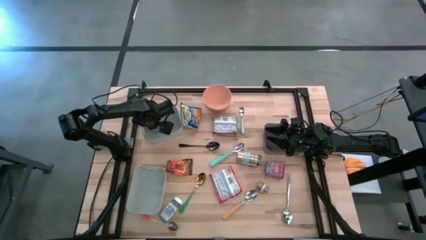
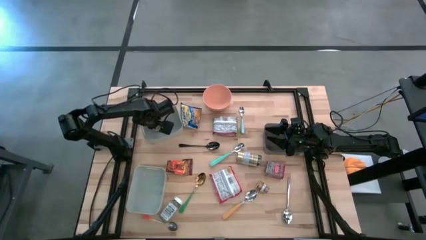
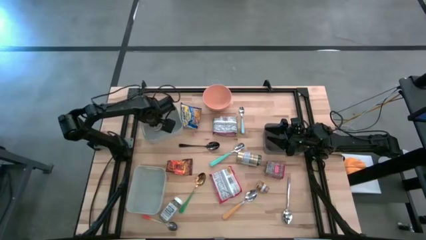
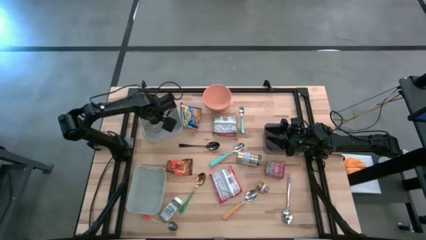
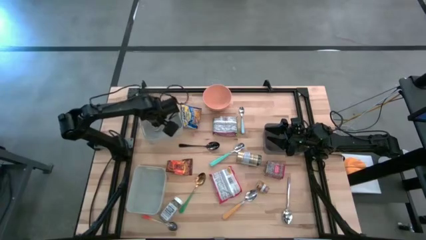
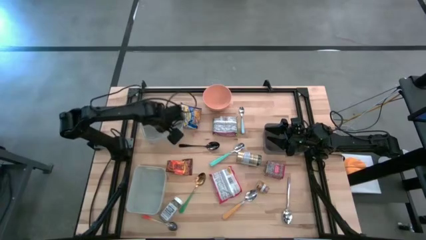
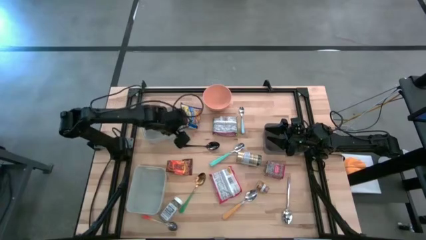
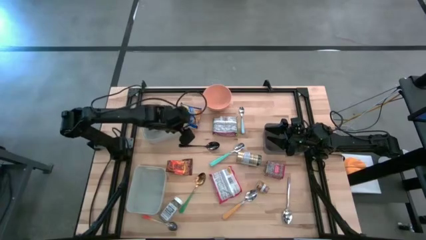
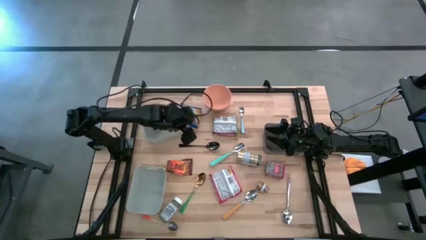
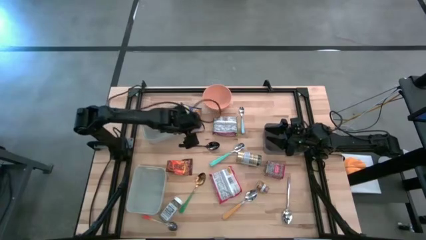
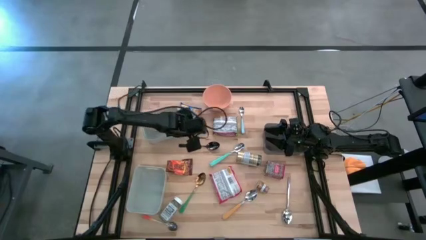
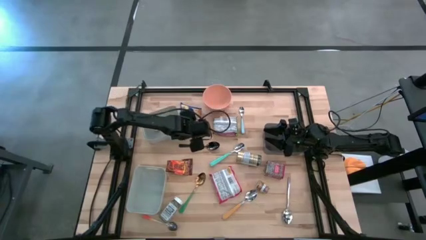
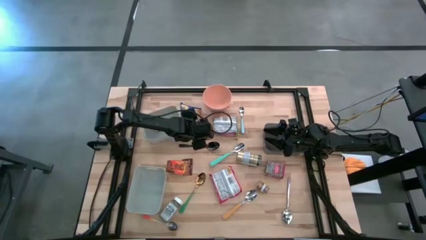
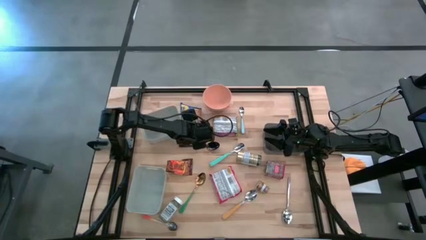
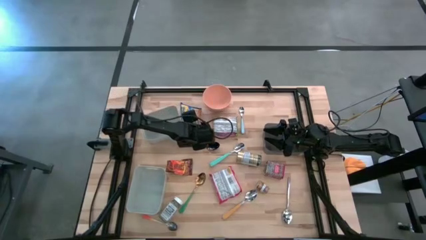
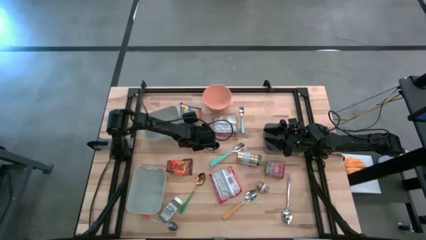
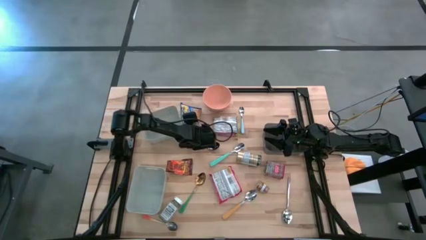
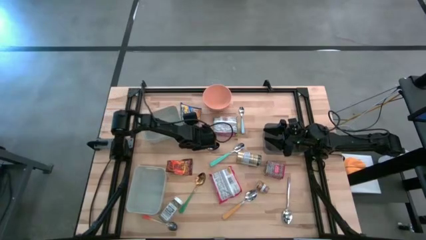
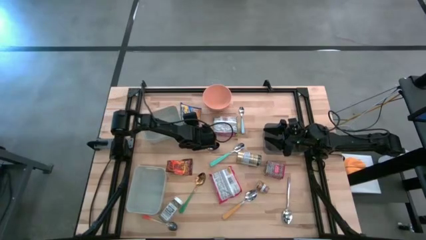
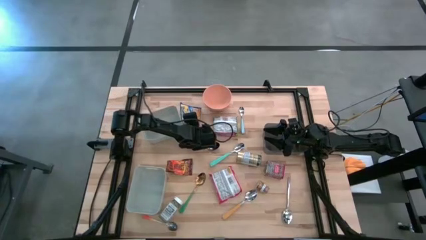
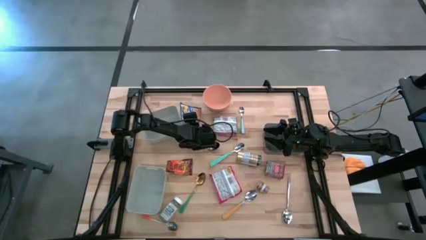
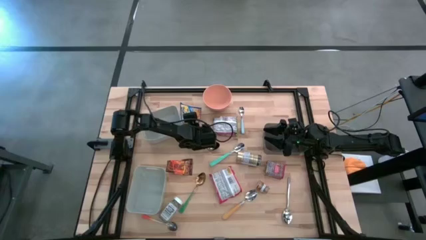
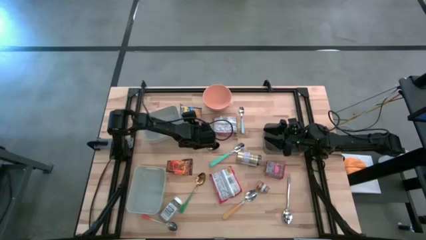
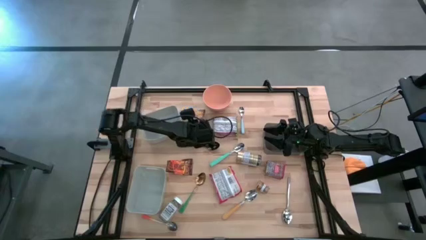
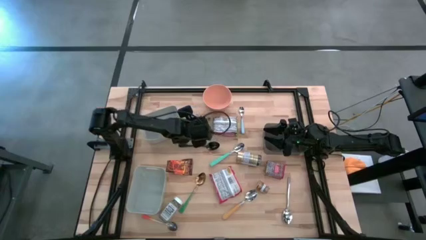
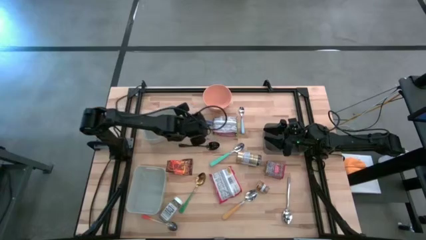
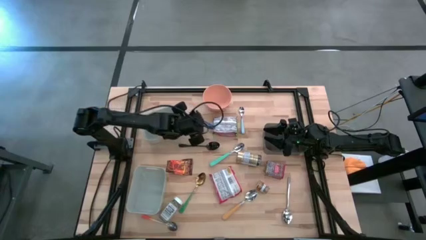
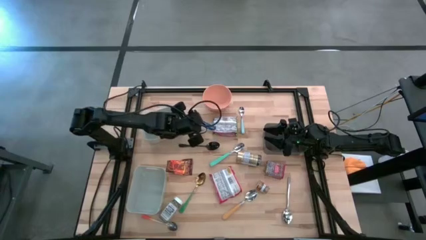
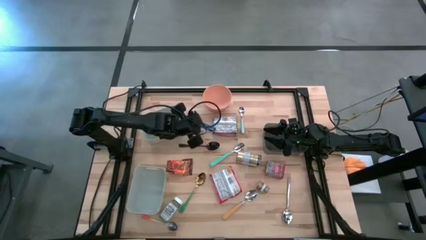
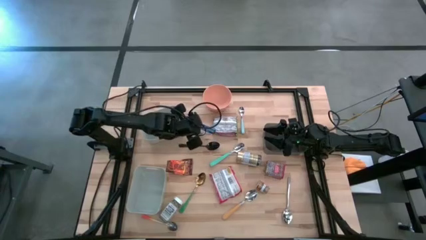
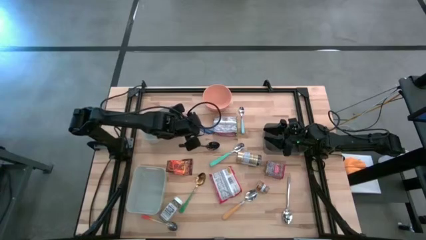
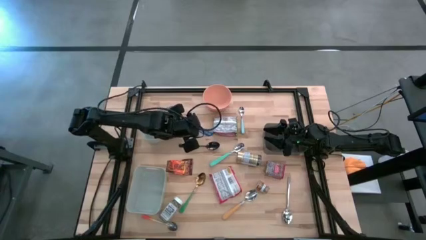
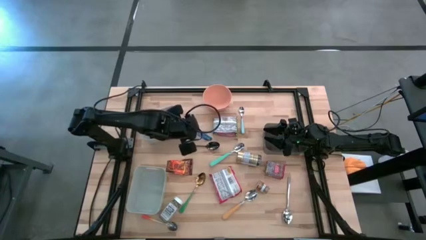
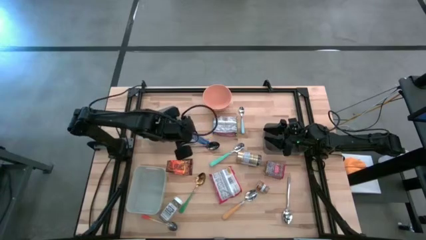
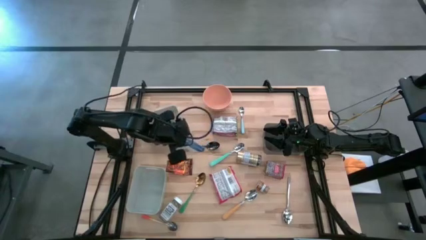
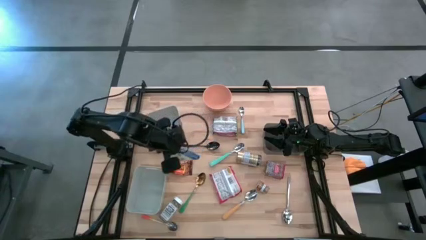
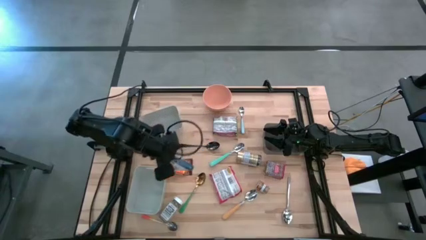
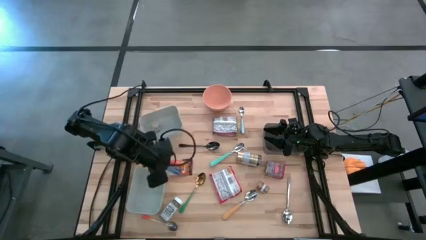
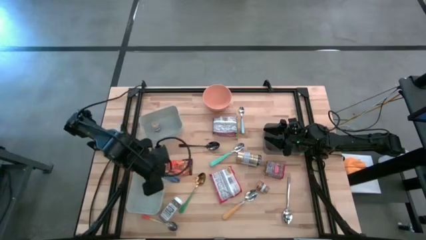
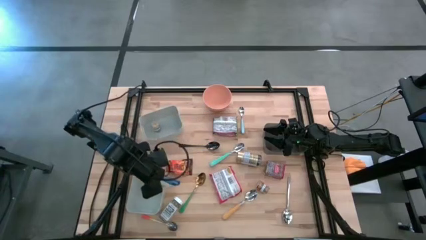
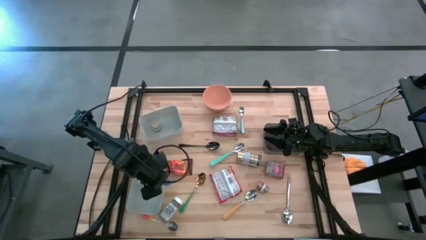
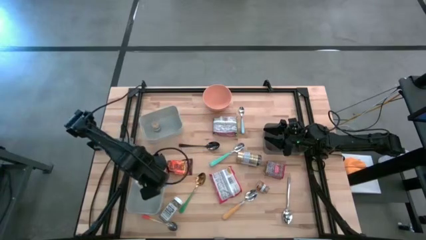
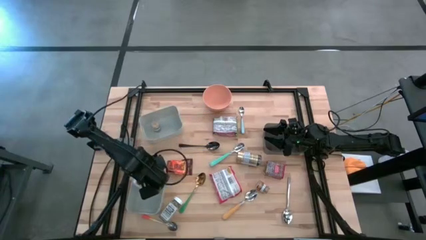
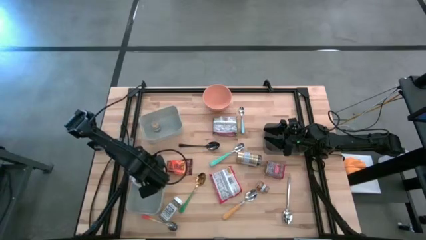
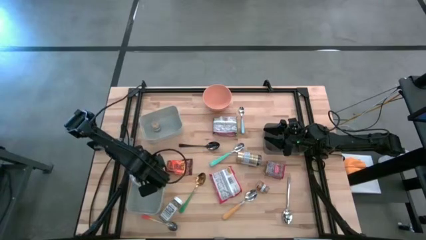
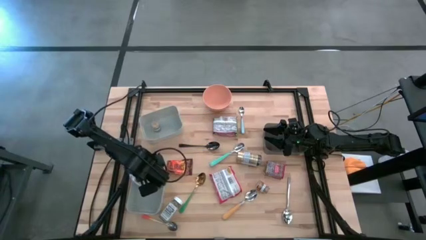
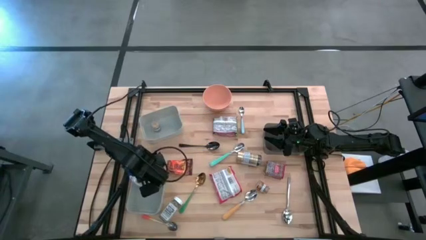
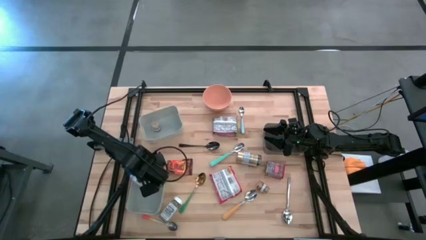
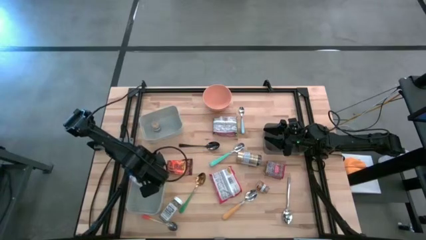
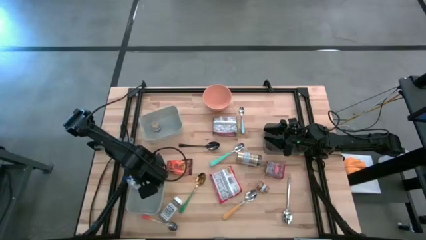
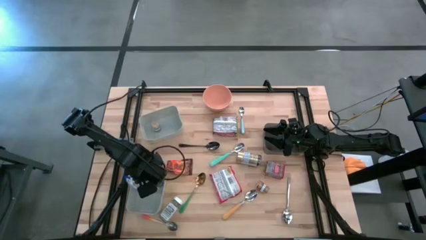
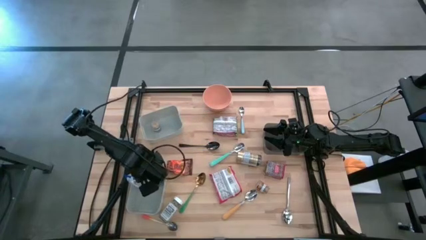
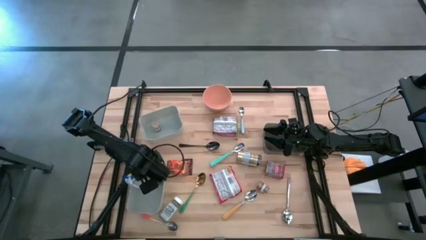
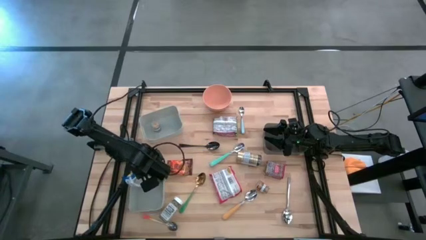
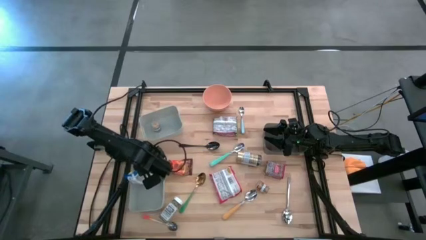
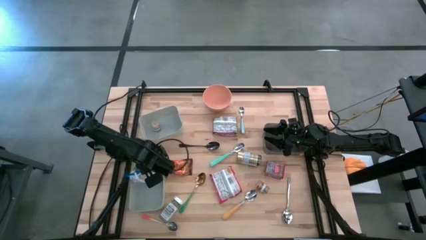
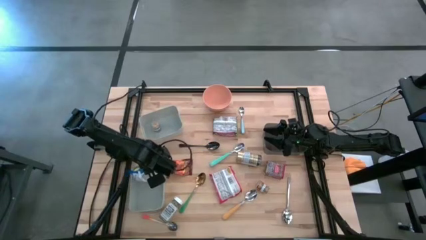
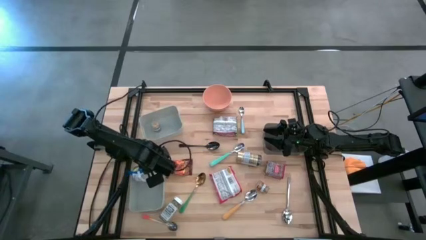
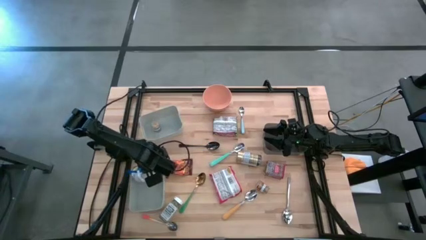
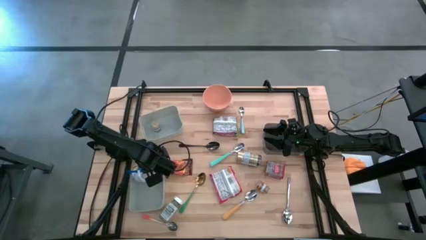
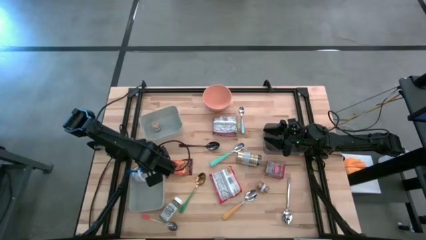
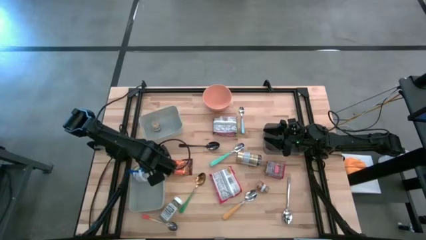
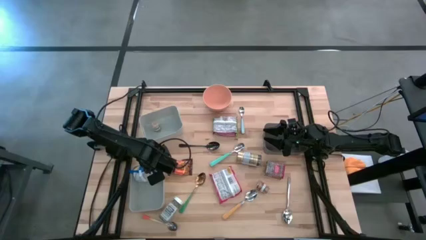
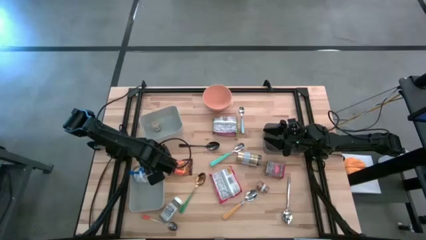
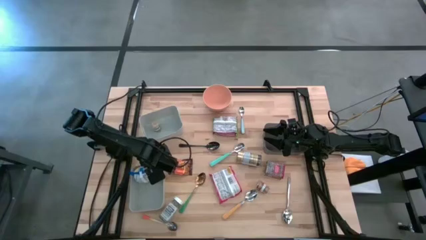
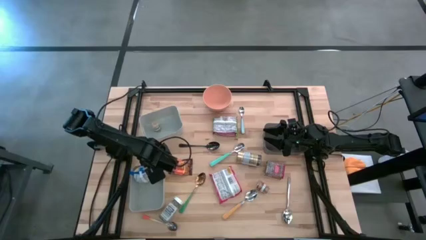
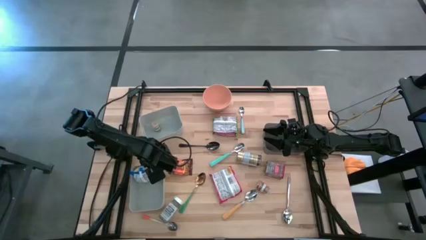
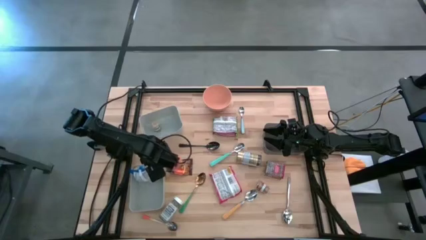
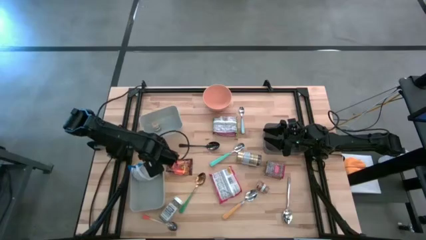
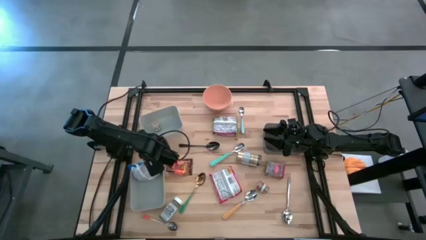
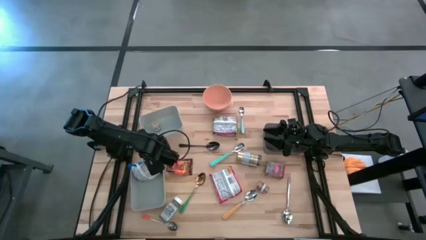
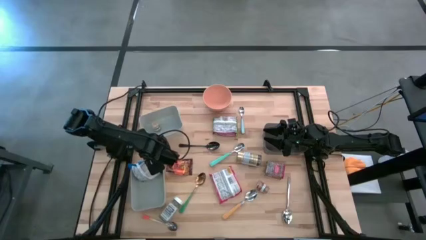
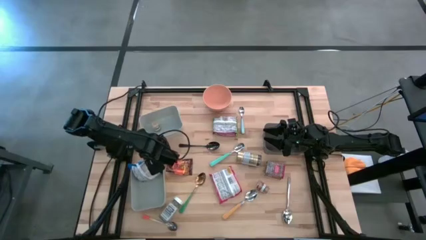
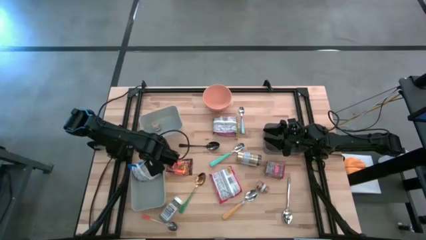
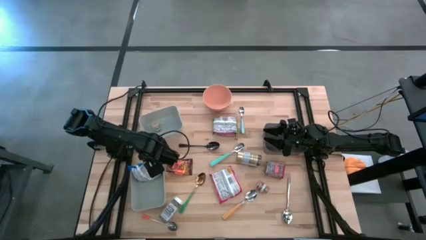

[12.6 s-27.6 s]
Put the blue noodle pack into the bottom gray bin
